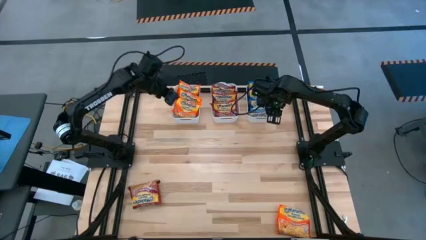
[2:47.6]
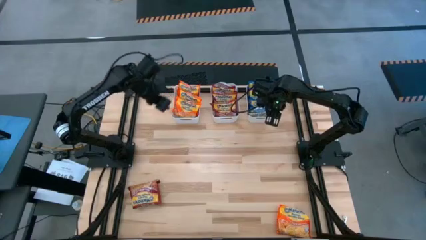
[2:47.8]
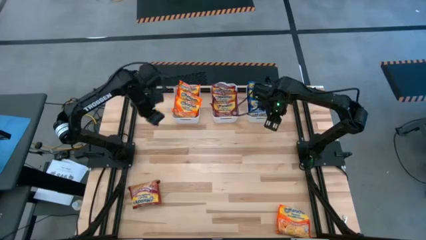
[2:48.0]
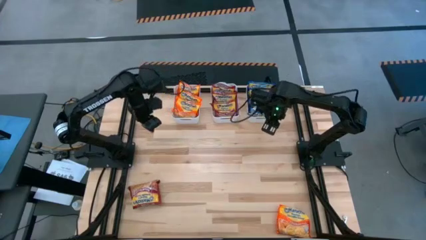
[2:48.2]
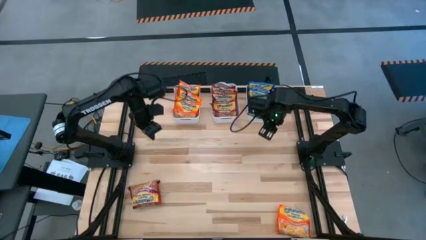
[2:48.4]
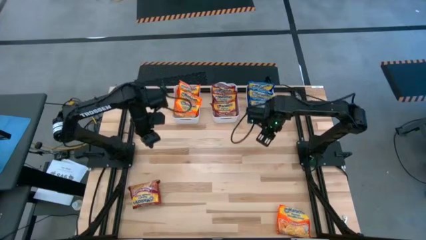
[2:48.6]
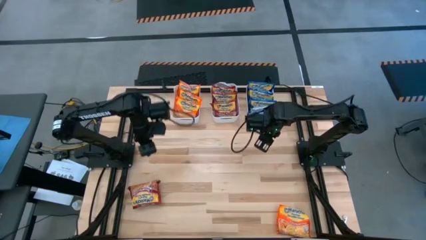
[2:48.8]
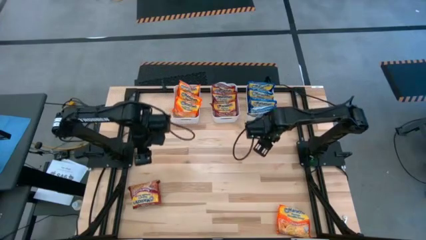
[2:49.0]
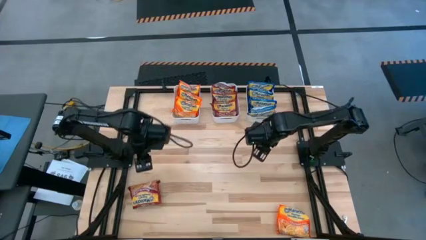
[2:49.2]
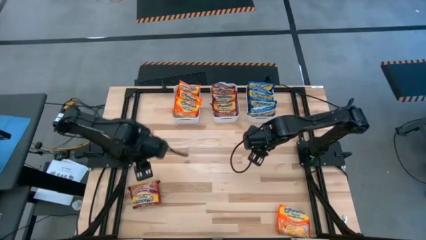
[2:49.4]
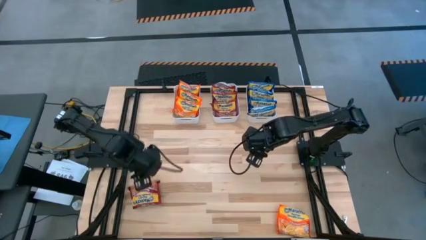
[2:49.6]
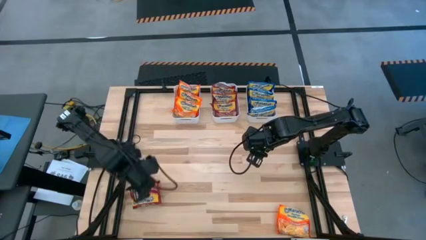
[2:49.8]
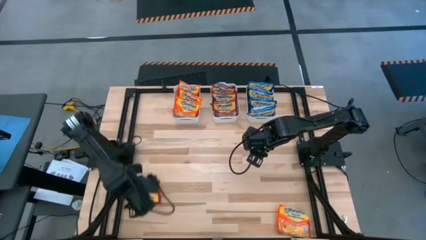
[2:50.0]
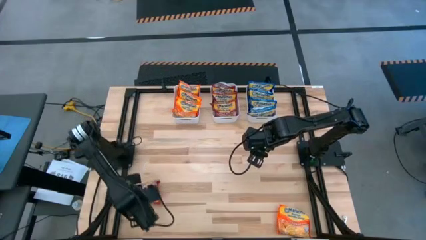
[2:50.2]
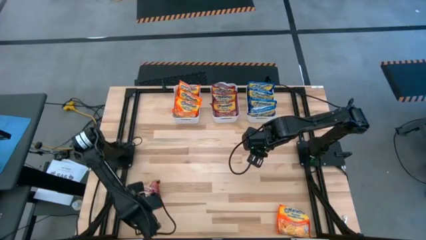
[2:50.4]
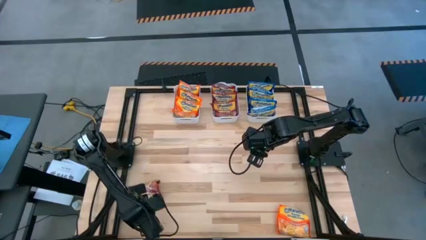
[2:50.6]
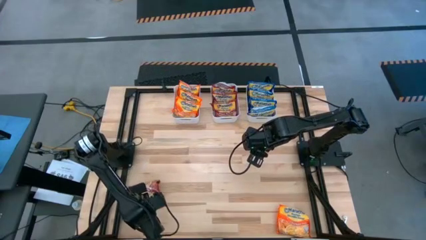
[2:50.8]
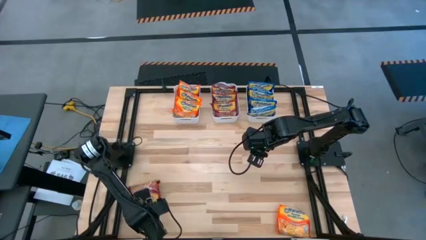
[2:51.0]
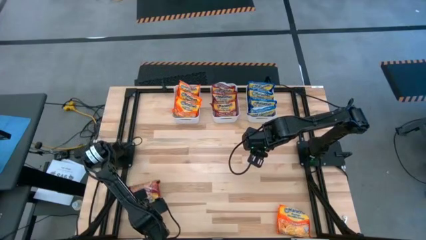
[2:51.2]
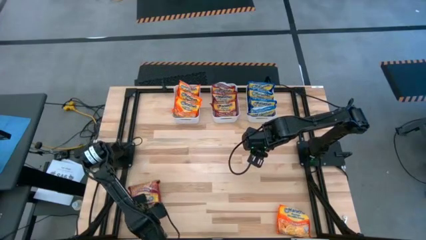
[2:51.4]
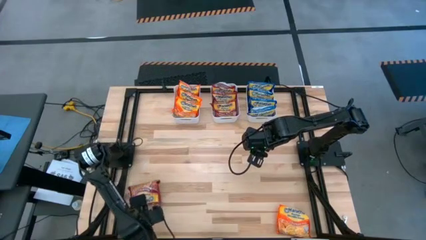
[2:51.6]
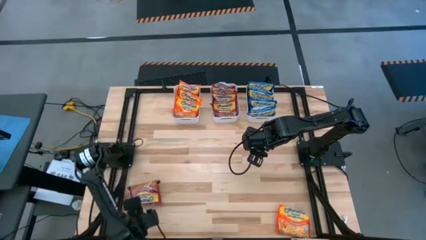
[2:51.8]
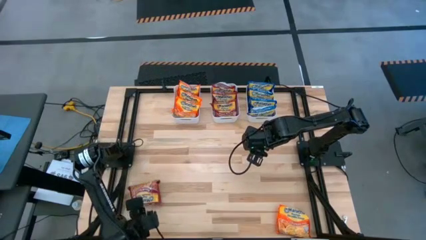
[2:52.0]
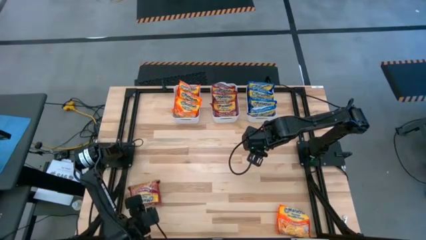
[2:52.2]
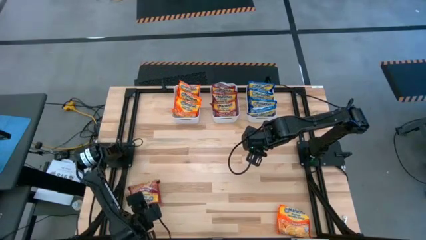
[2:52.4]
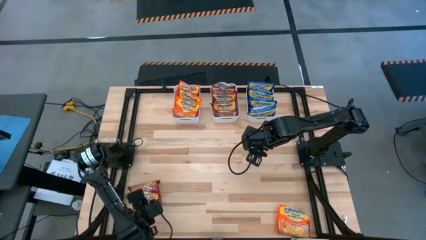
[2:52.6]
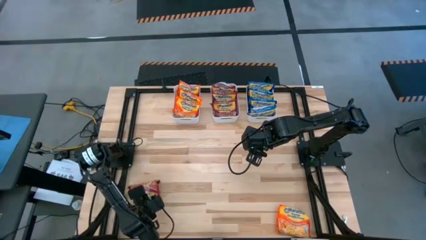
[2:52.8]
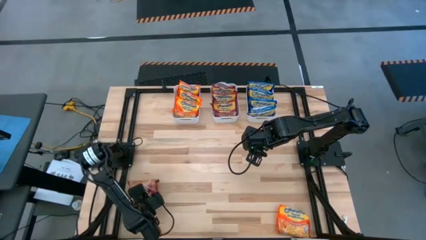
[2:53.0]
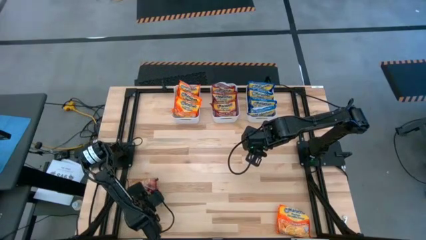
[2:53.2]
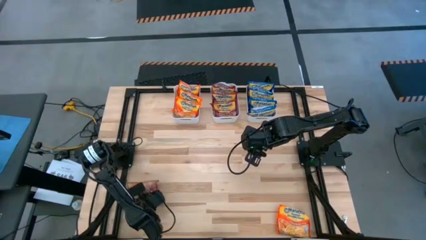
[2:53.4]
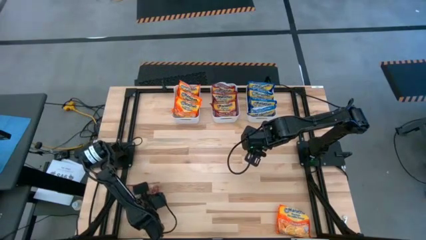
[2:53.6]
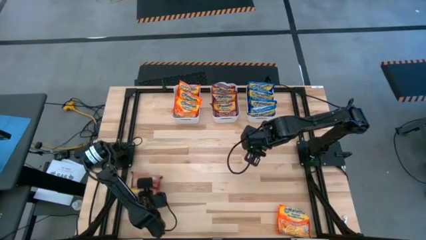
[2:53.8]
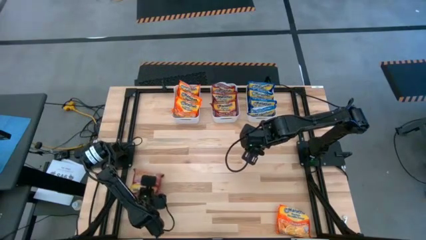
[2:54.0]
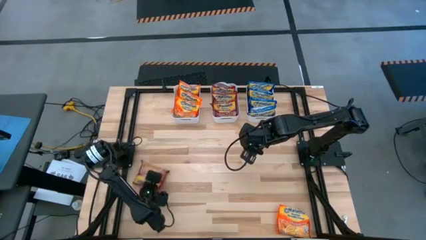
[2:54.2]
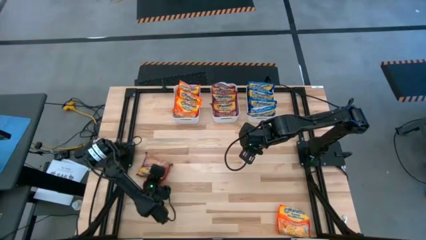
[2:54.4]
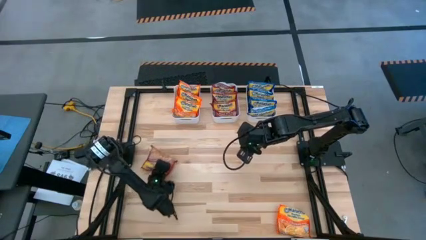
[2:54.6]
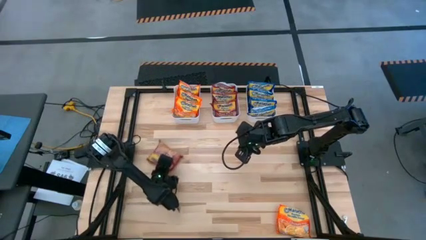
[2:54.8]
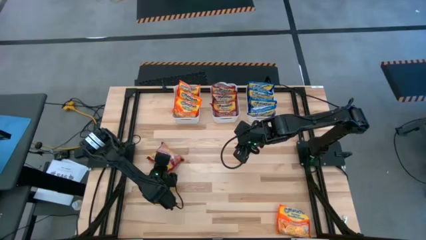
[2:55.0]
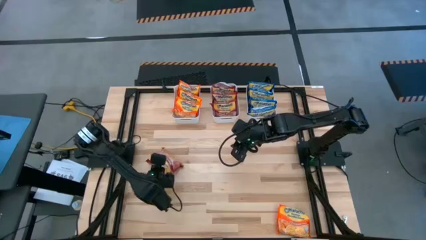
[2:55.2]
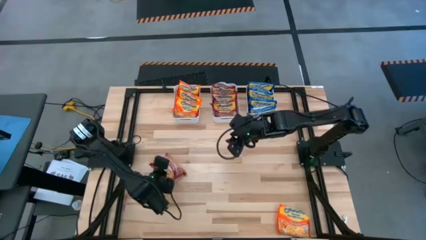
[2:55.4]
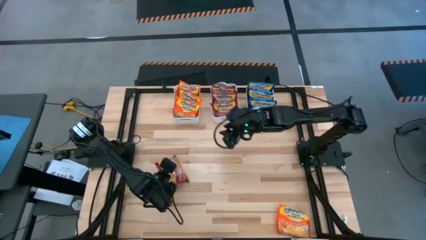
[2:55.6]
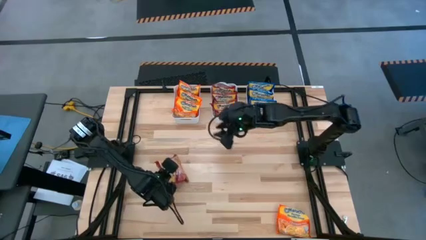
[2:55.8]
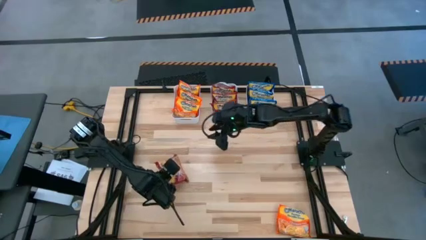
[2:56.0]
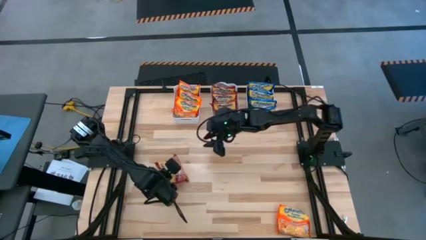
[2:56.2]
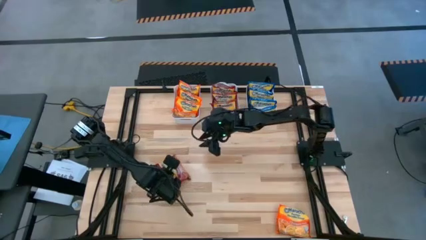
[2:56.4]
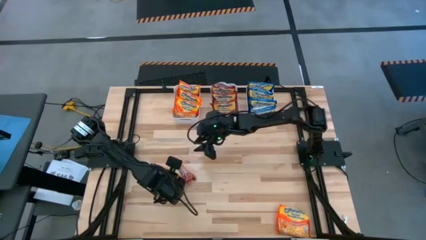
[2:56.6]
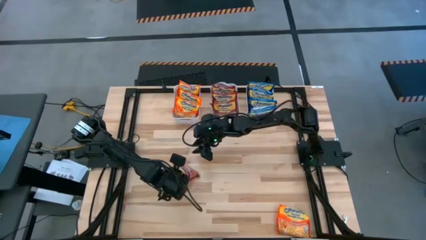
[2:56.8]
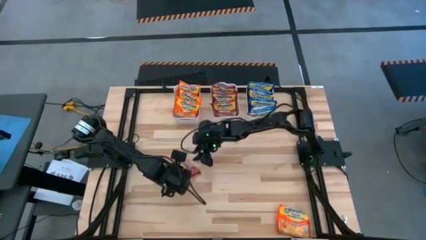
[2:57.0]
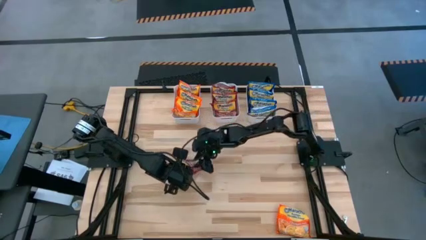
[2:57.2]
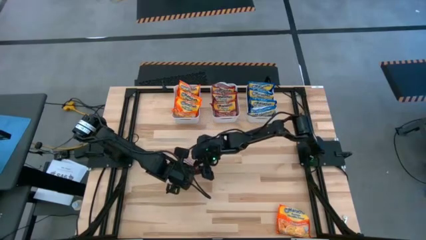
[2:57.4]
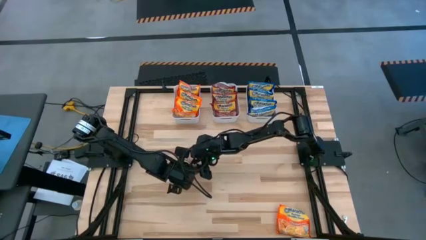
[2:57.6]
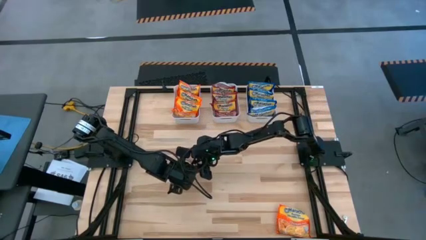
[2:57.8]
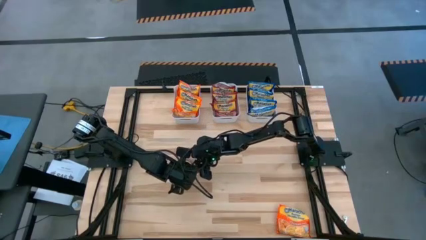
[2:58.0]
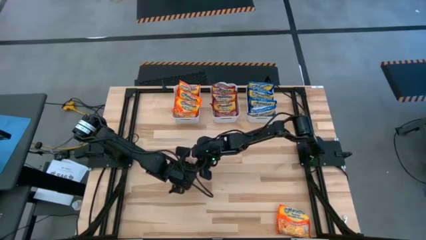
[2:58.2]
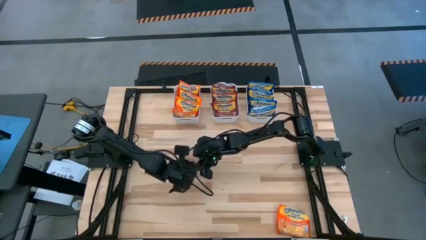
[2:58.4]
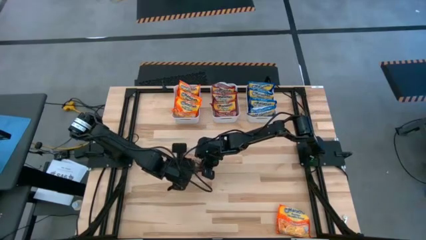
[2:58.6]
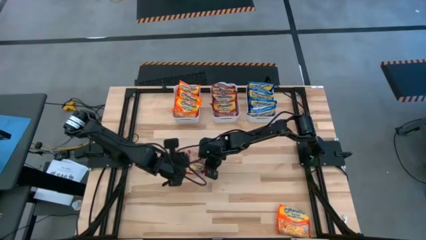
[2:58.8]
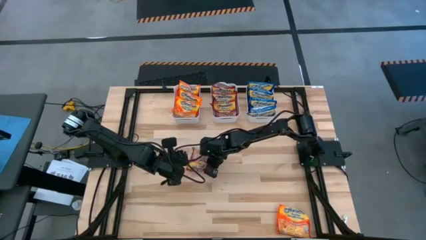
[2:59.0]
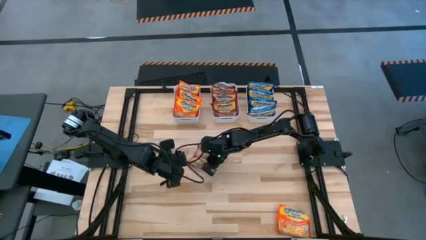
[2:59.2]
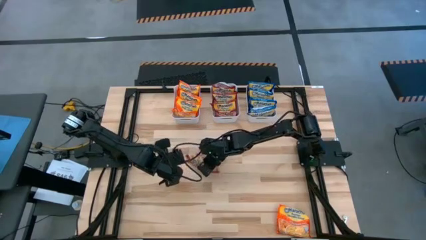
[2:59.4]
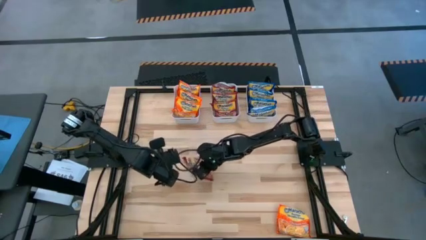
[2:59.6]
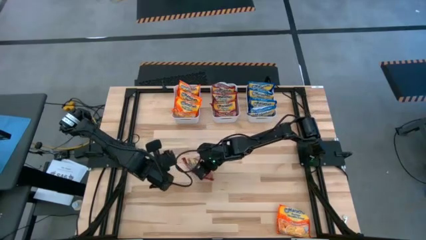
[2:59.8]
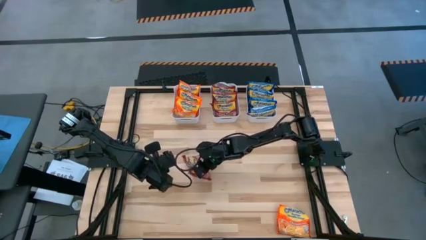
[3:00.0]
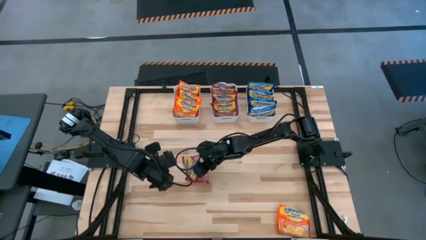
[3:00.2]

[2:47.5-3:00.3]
Task: Sort Maruchan noodles
Put the red noodle pack into the middle white bin

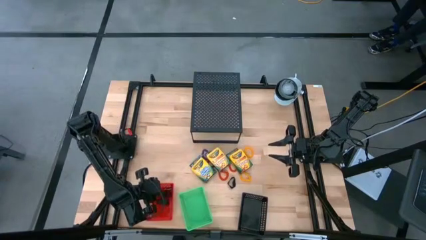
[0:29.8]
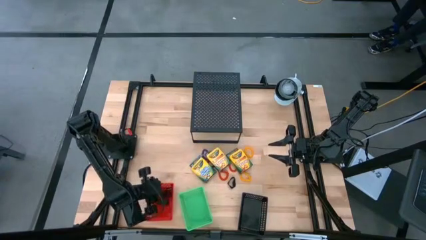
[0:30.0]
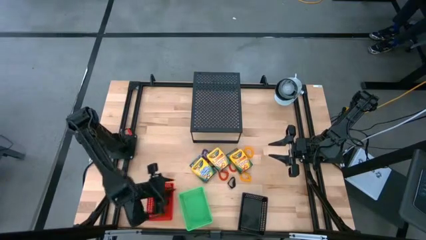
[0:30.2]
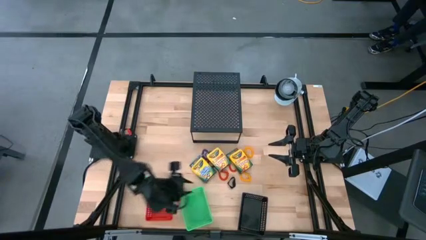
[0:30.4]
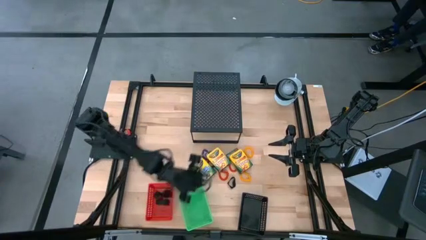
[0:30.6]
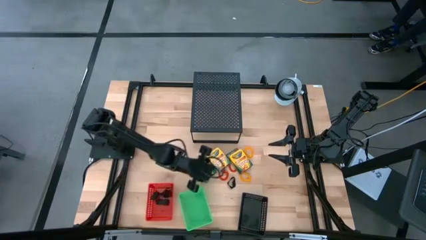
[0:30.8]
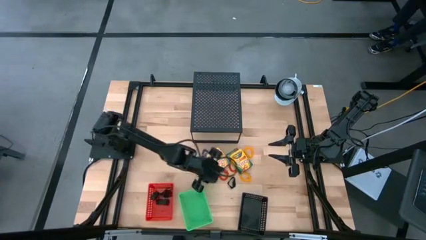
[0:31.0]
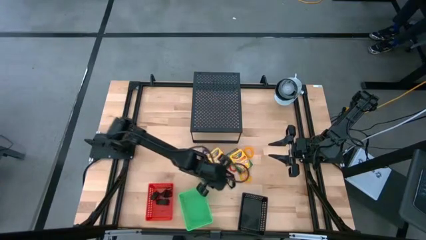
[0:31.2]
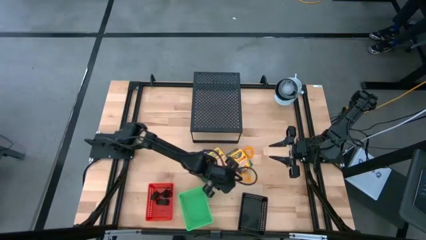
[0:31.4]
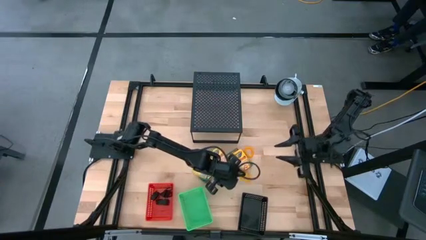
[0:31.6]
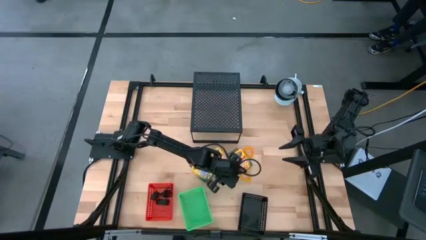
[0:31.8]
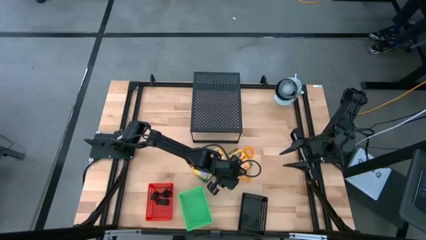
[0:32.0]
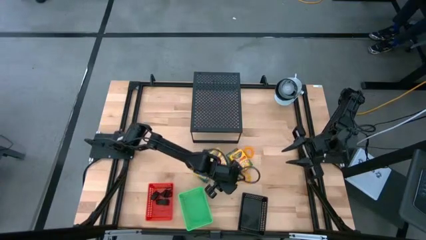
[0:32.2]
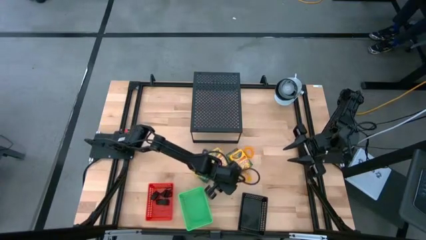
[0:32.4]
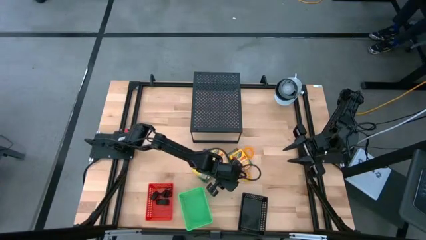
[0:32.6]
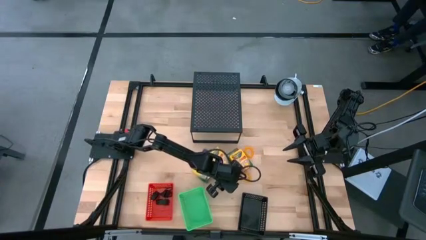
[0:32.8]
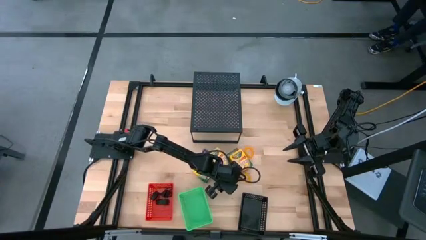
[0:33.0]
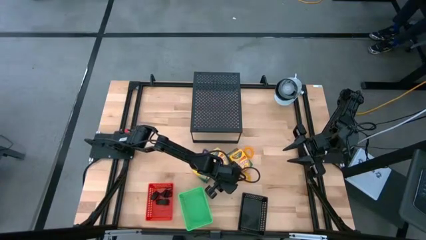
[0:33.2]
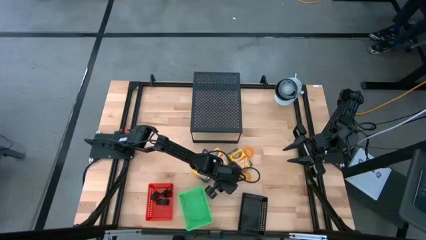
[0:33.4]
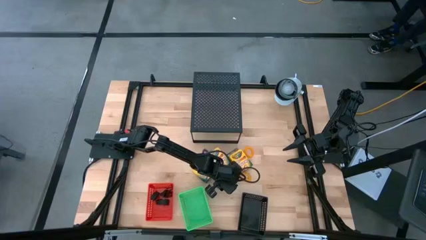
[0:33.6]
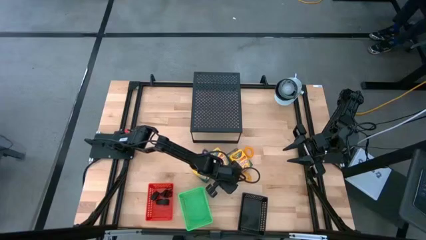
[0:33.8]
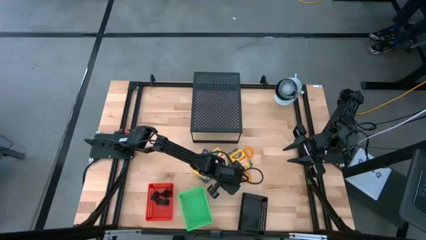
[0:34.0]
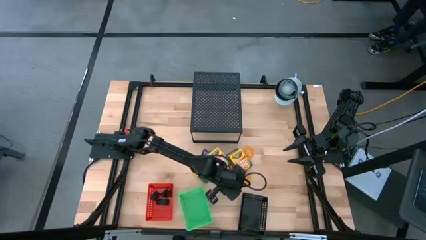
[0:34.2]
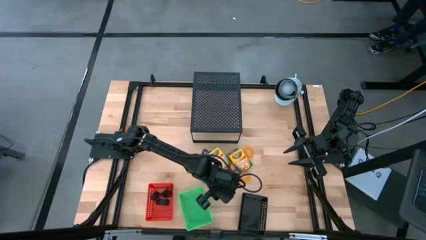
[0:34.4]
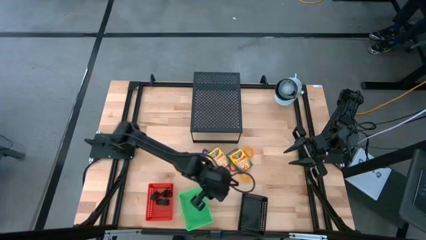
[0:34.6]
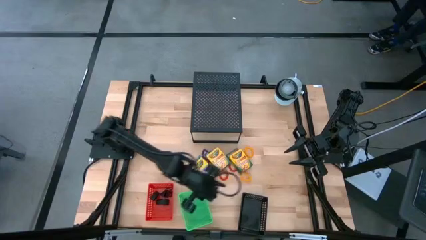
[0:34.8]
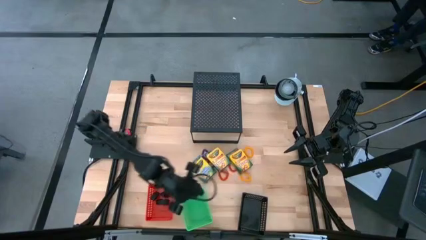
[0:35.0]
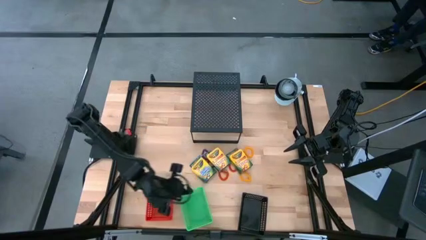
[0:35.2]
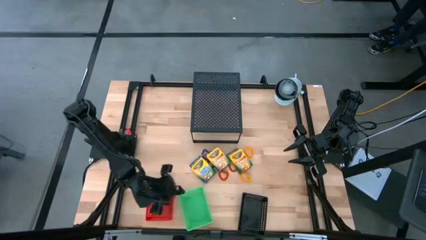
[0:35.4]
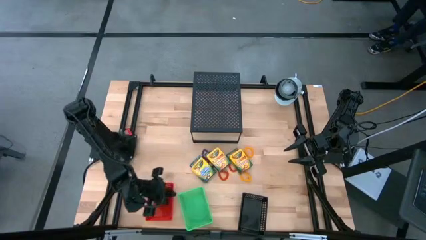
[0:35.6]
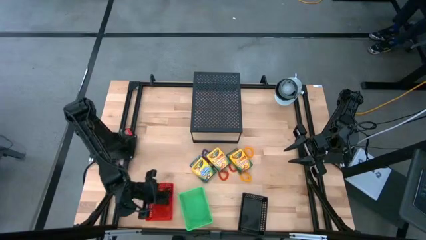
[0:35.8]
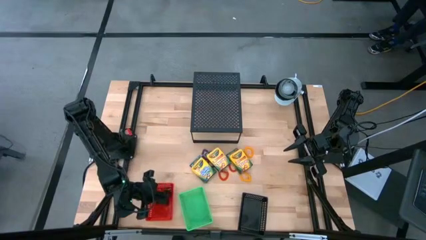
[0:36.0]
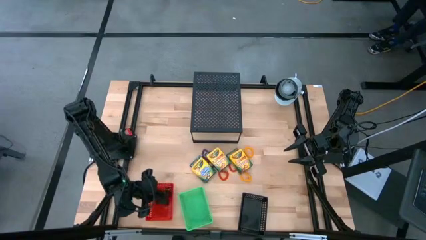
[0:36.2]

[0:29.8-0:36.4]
Task: Pick & Place Office Desk Supplies
Put the black rubberband into the red bin
